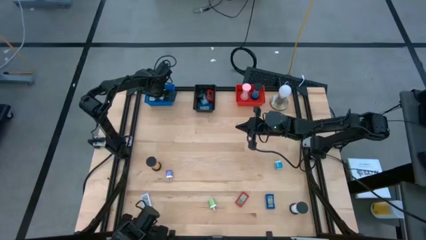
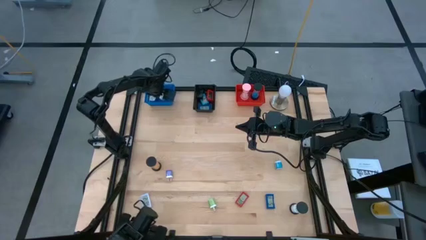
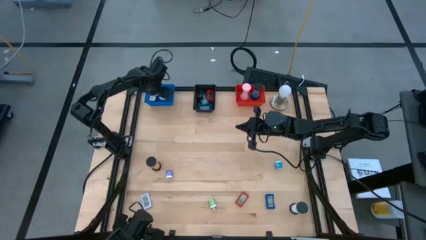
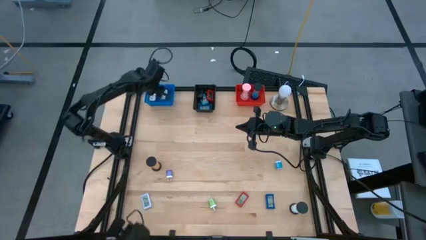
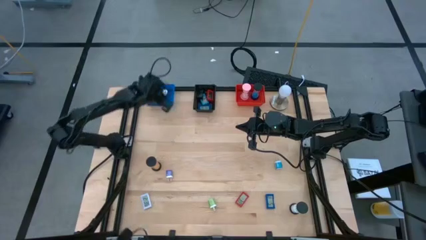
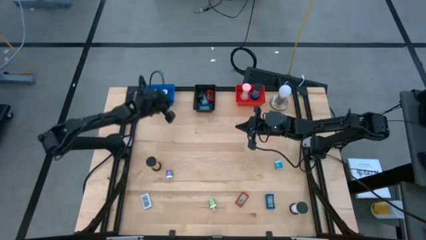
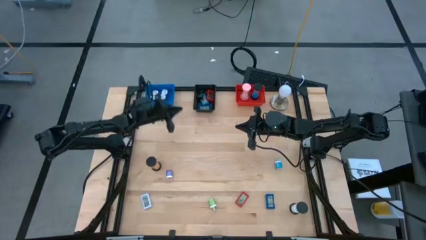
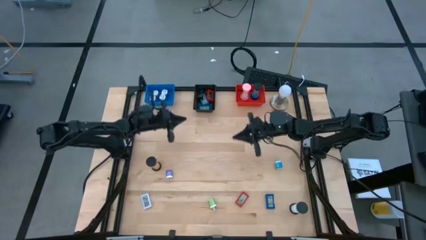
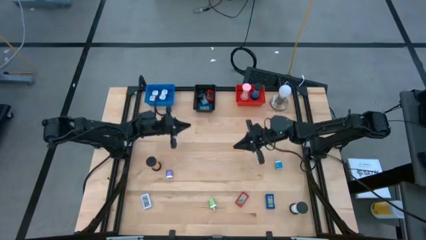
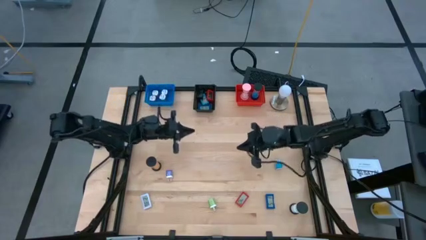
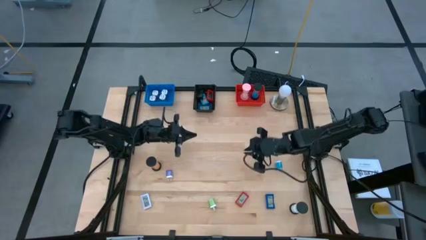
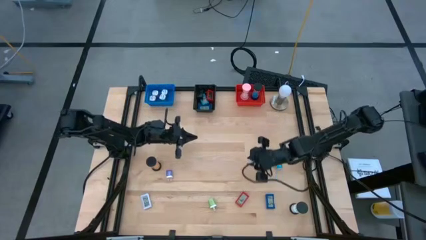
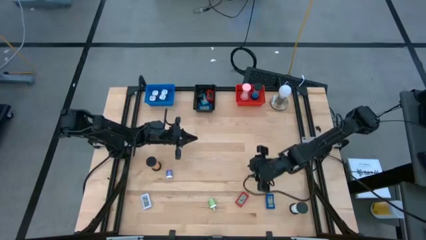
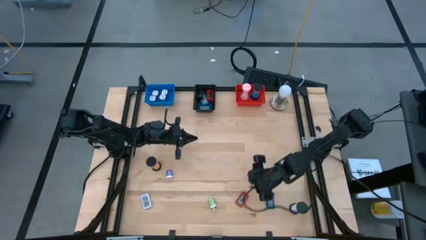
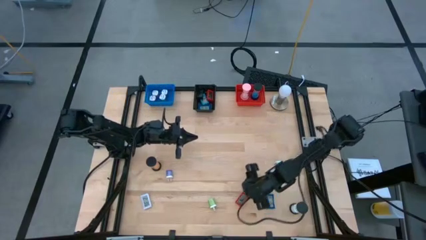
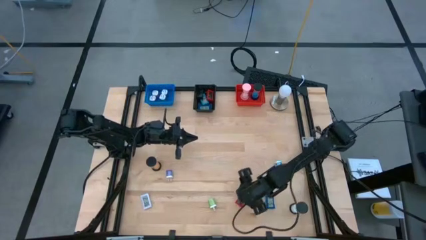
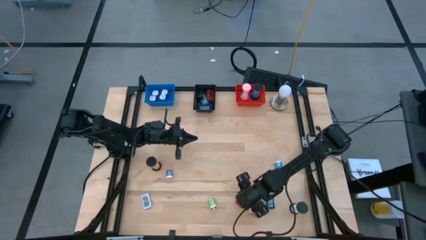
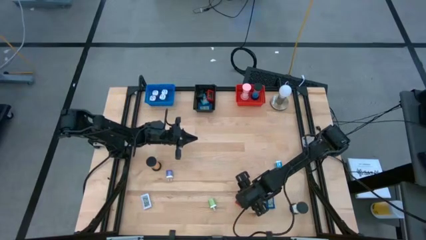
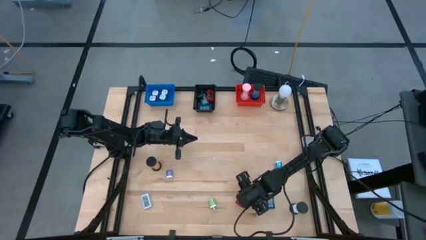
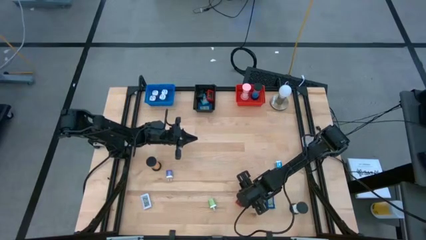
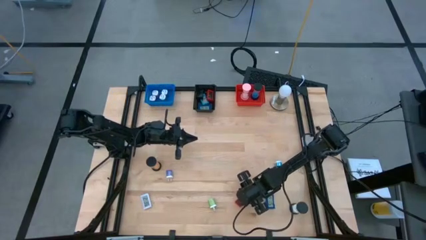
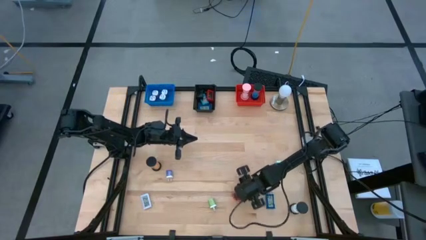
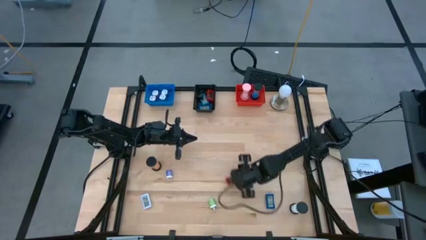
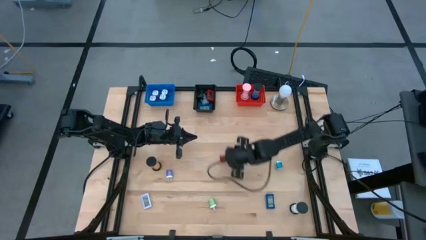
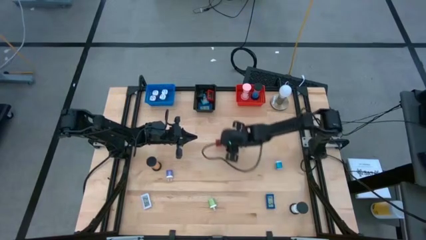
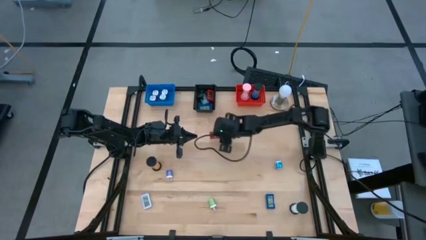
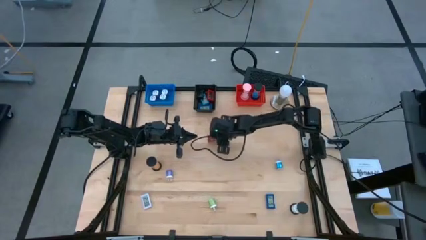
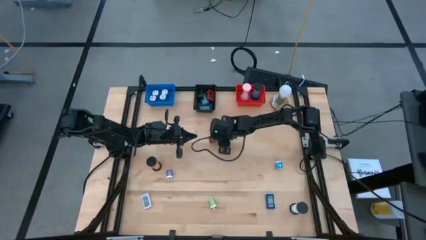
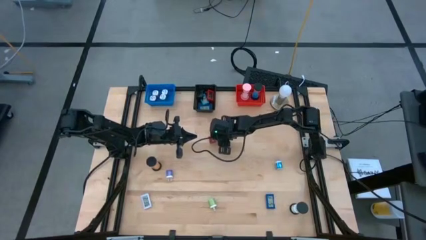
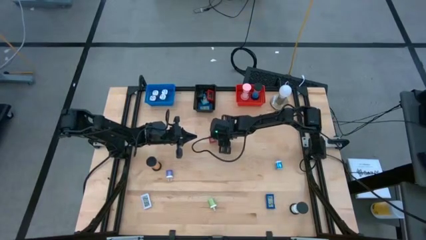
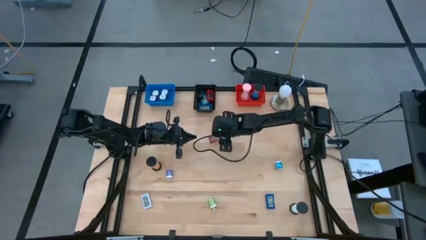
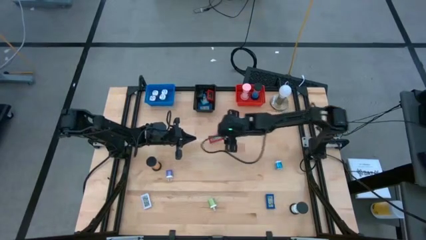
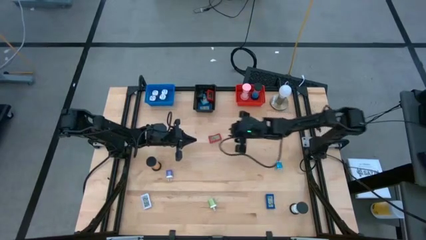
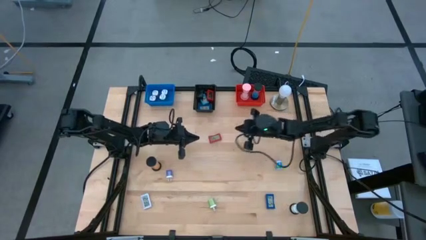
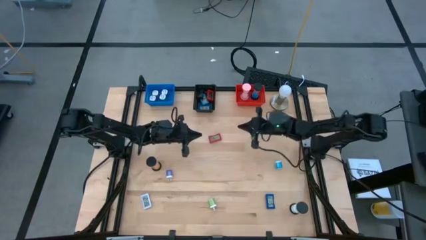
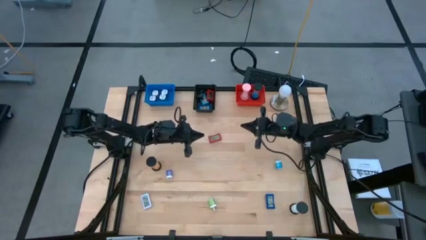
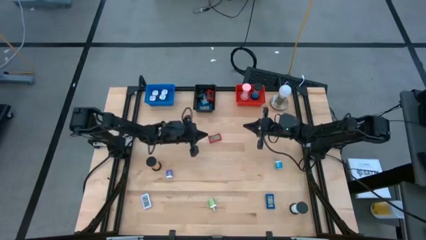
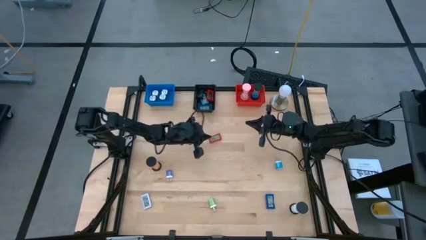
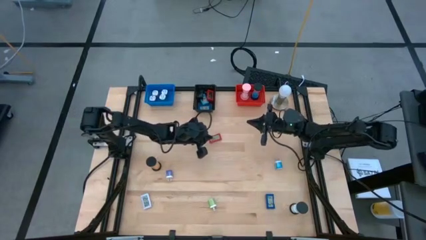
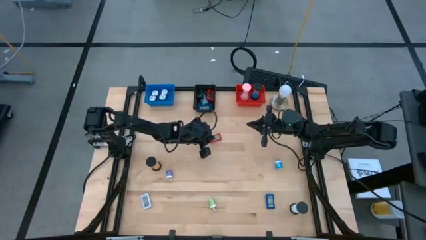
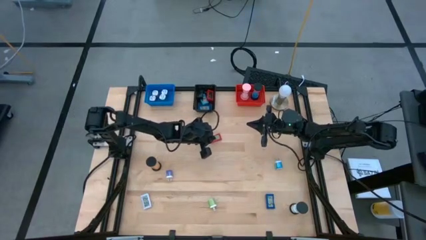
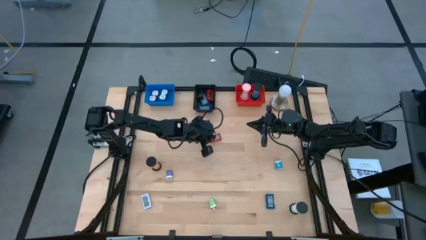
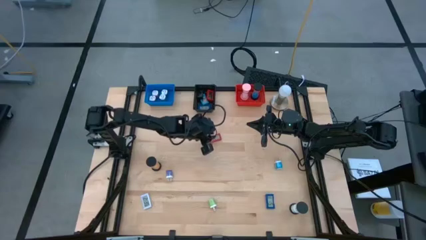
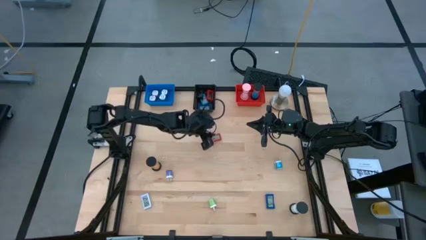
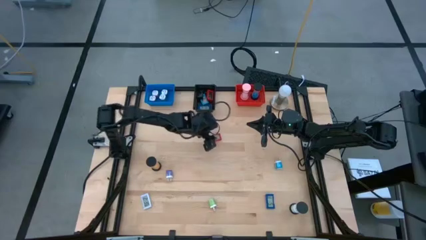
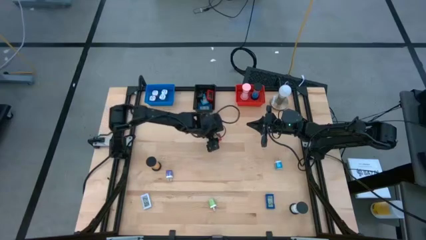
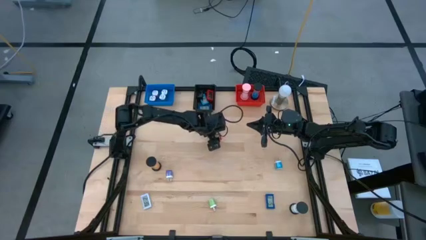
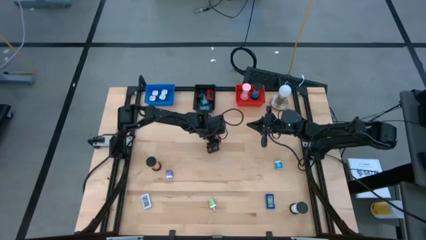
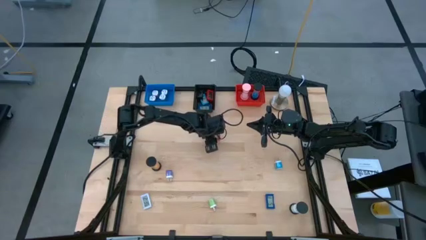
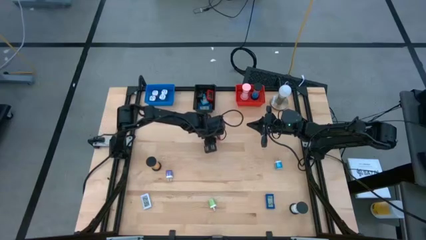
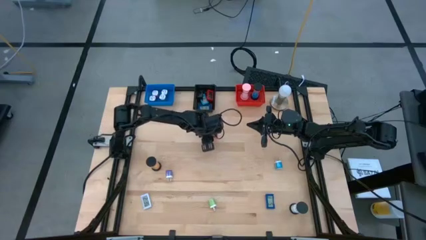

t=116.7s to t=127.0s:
Task: Pick & Place Office items
Put the red digital clock into the black bin

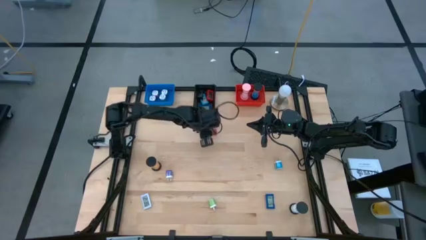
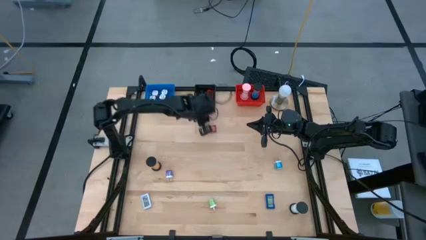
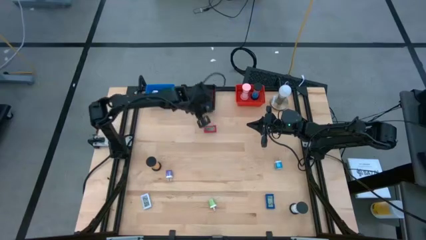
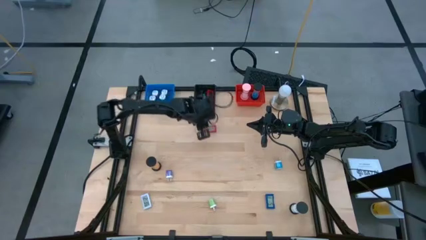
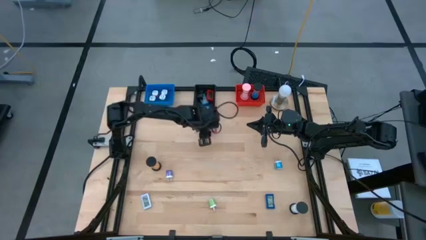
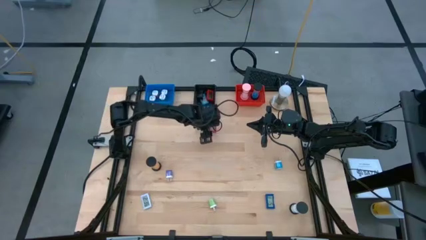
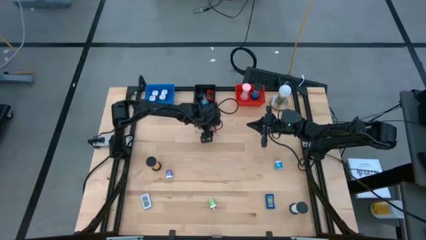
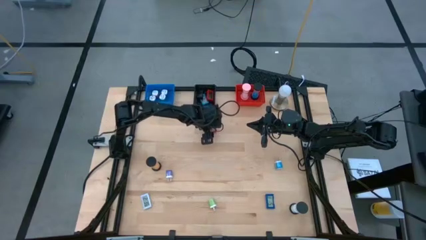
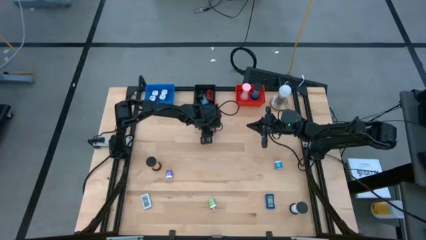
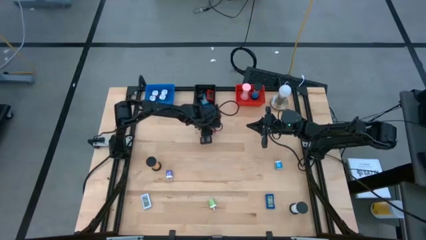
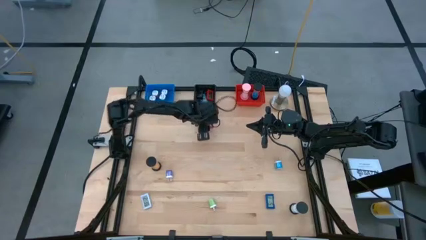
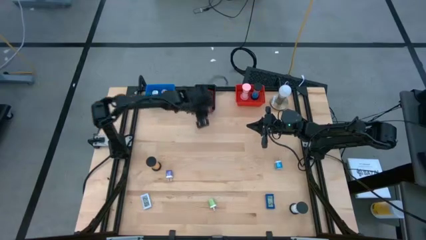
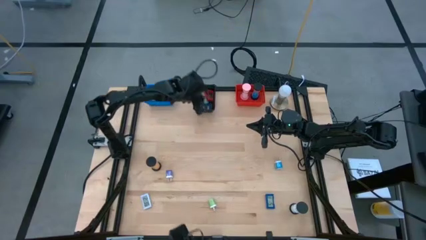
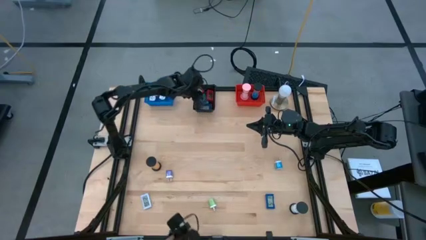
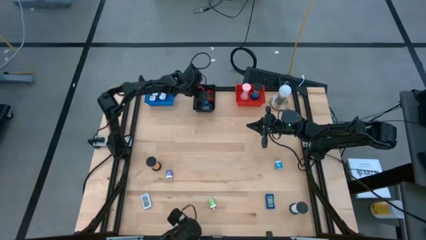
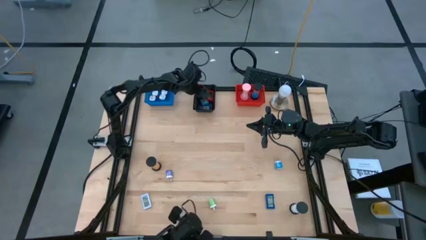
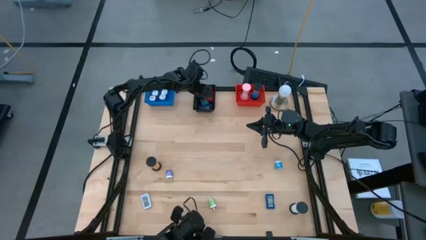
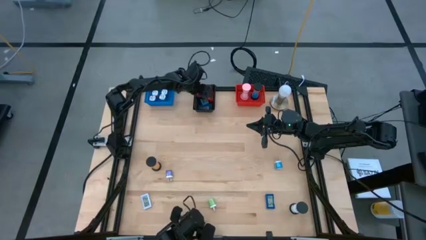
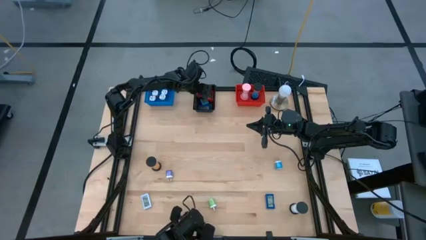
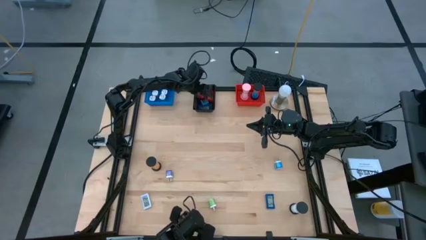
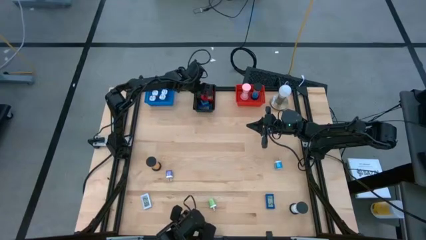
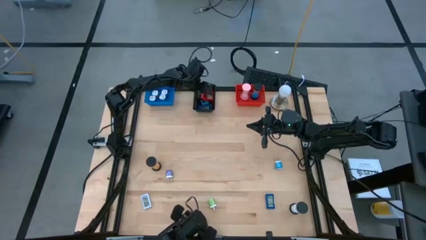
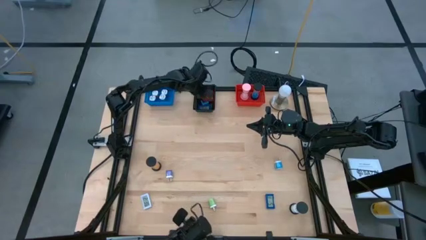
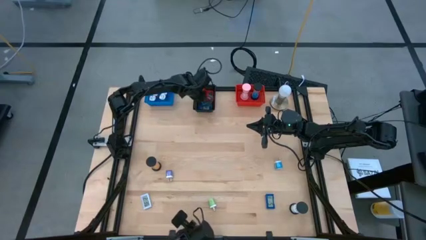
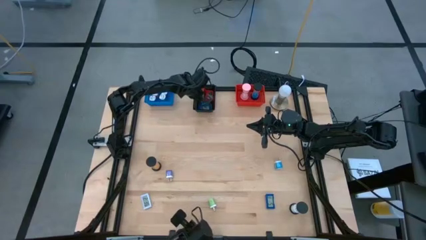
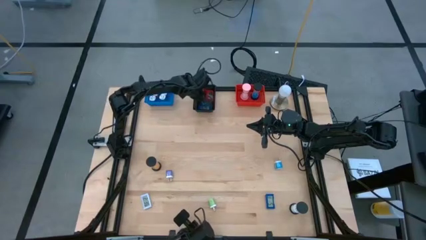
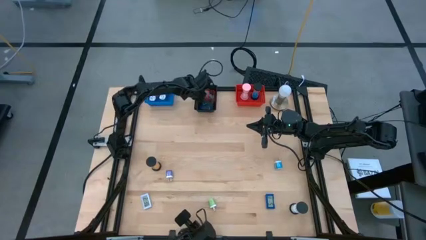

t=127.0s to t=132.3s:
Put the red digital clock into the black bin
